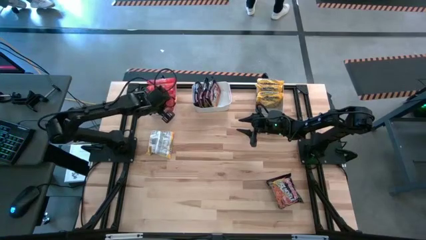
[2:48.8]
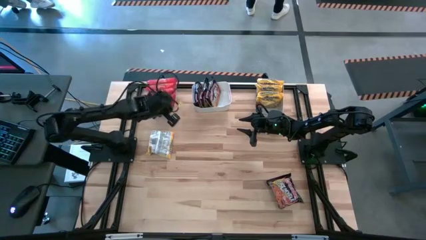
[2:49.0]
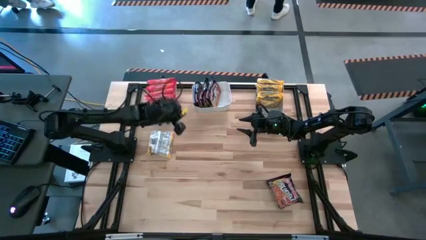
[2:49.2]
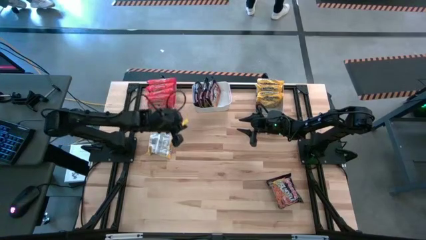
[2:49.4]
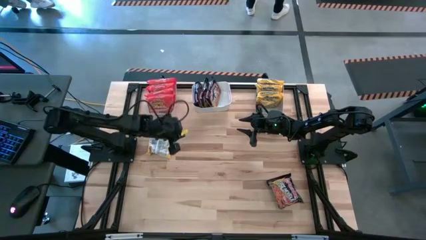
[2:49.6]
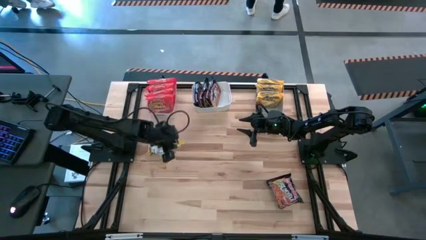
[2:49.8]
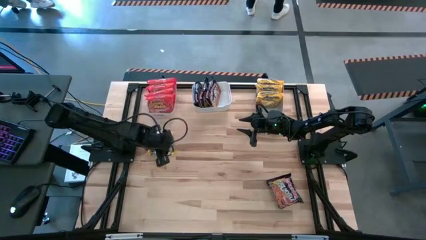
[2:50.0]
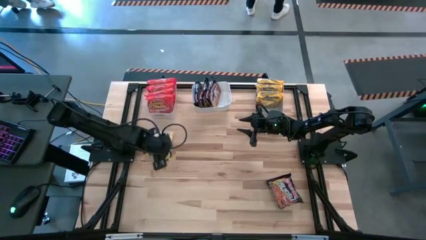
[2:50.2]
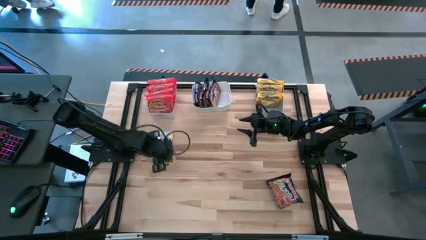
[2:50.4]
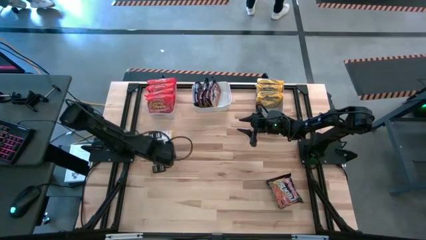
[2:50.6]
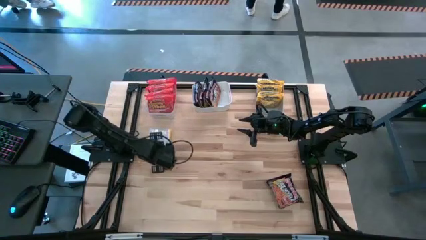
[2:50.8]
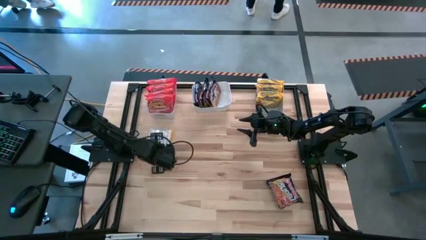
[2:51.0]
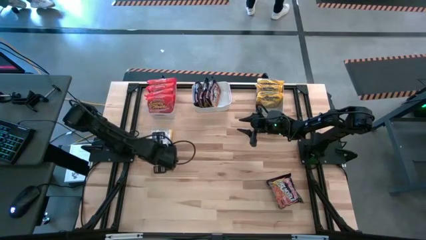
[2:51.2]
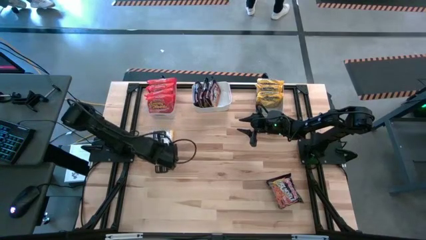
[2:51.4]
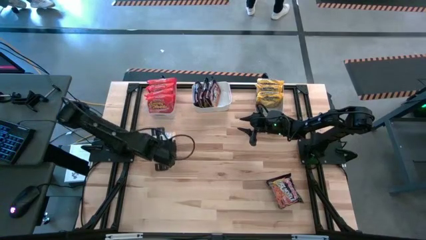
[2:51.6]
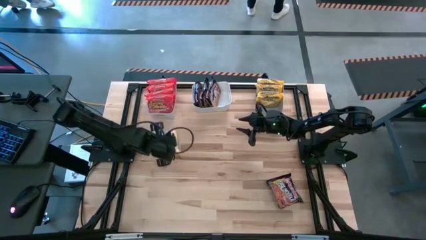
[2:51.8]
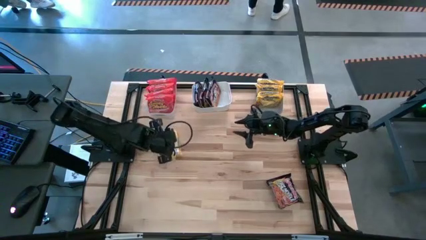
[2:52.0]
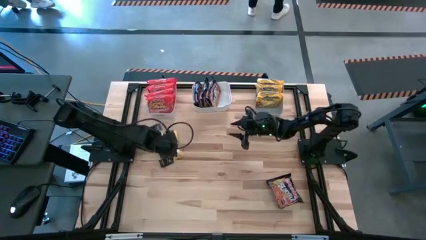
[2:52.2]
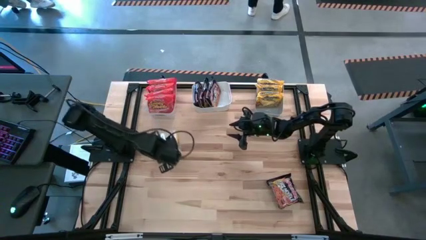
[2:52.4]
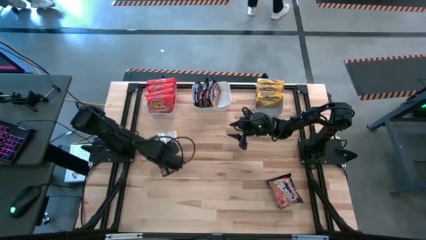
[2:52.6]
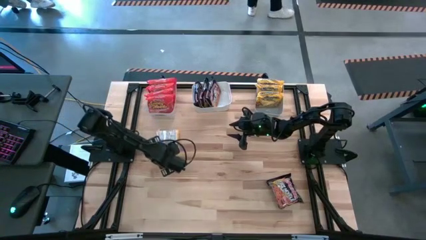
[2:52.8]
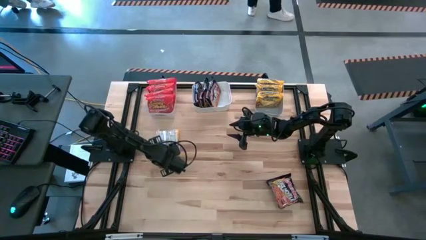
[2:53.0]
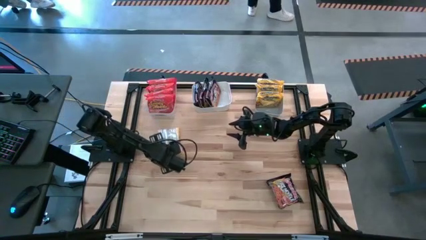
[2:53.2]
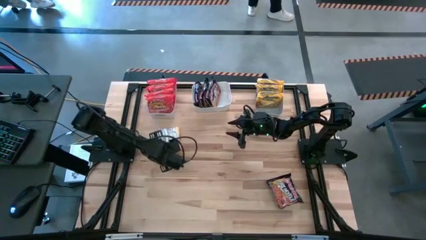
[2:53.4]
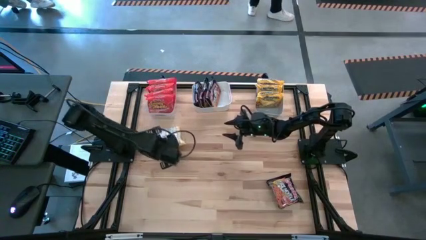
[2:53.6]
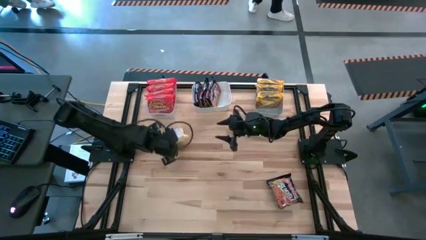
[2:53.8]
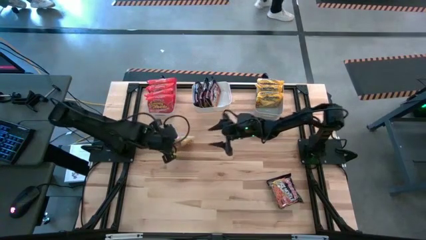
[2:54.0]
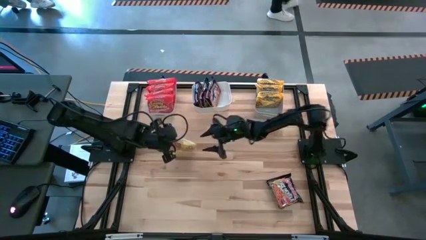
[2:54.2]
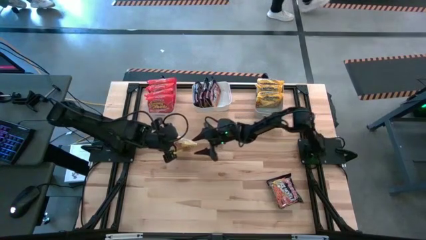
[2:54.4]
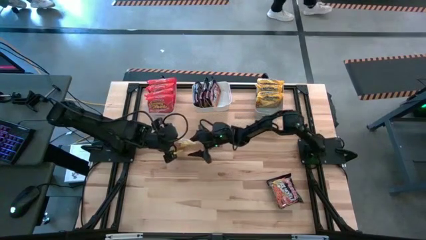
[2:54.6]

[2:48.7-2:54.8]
Task: Sort Maruchan noodles
Put the yellow noodle pack into the gray bin

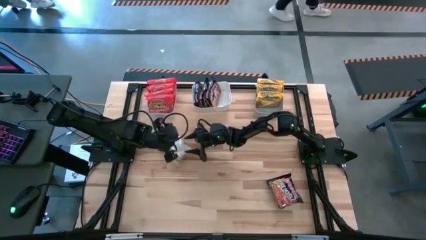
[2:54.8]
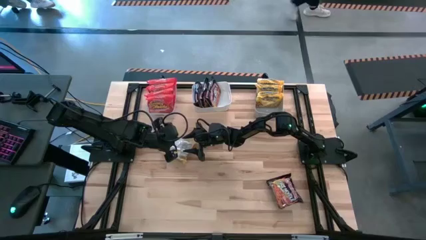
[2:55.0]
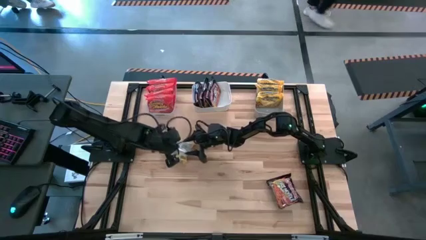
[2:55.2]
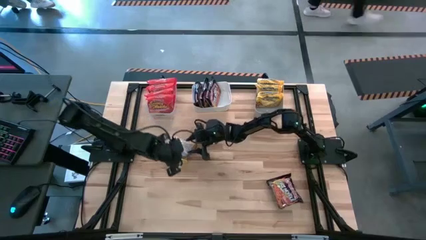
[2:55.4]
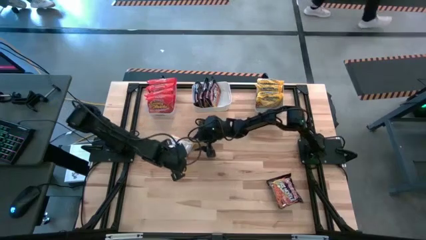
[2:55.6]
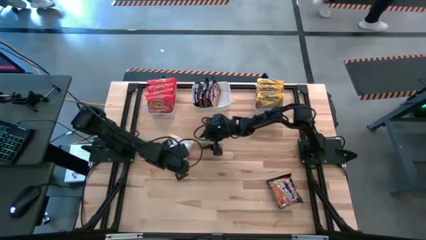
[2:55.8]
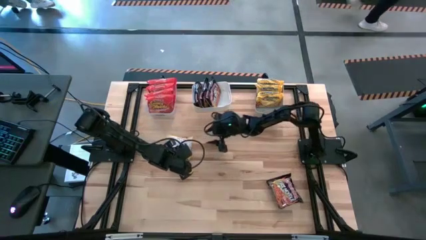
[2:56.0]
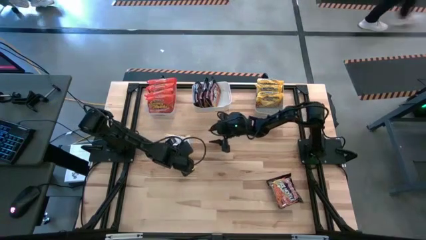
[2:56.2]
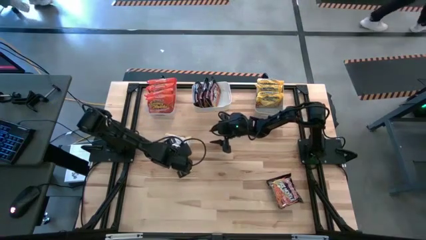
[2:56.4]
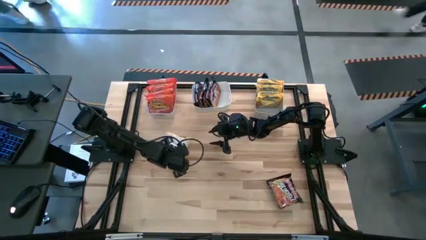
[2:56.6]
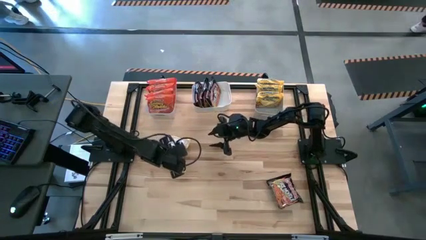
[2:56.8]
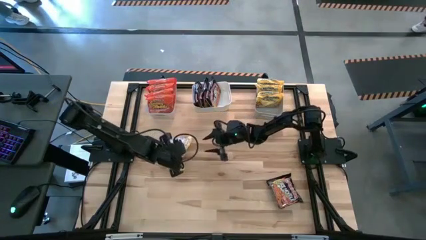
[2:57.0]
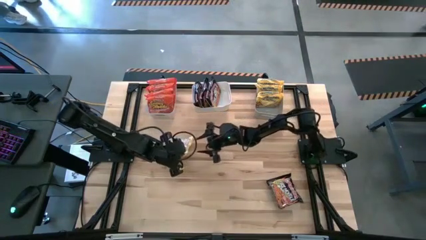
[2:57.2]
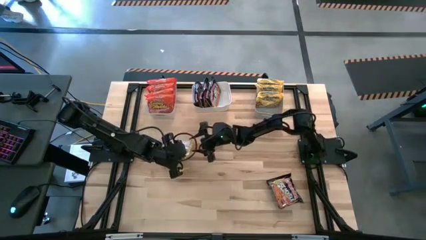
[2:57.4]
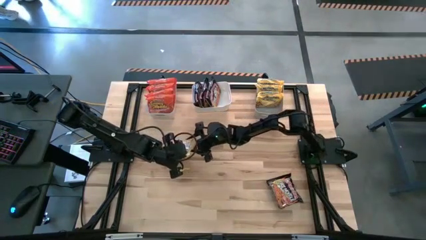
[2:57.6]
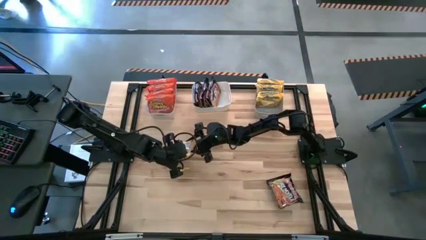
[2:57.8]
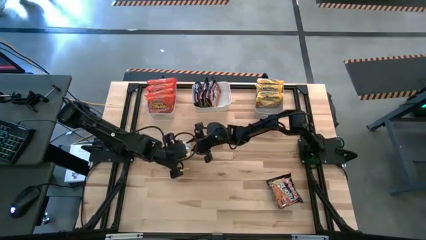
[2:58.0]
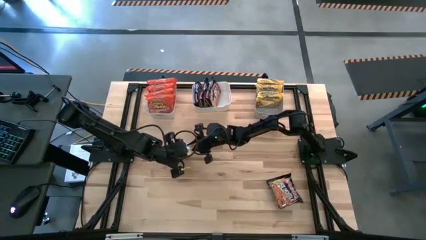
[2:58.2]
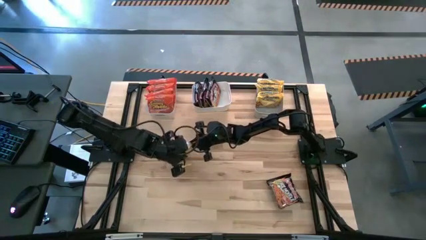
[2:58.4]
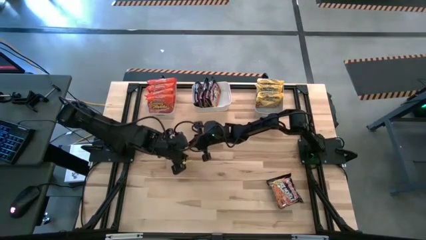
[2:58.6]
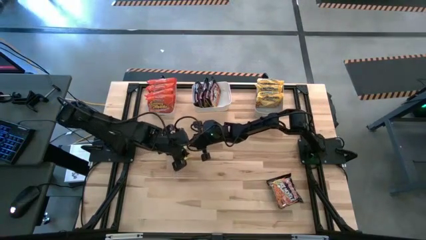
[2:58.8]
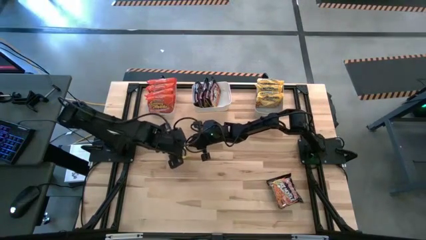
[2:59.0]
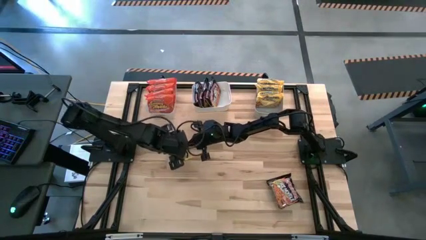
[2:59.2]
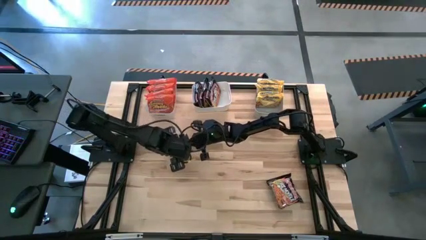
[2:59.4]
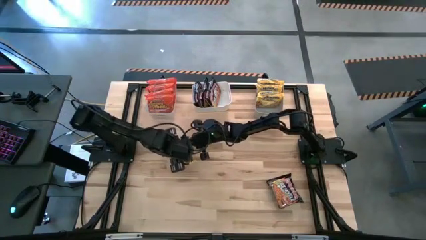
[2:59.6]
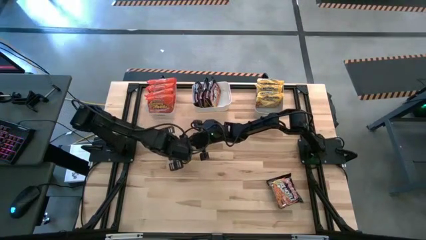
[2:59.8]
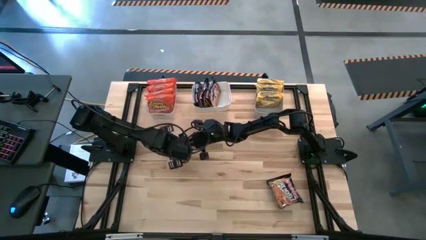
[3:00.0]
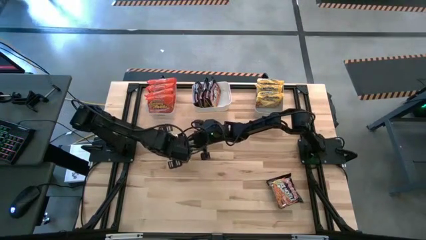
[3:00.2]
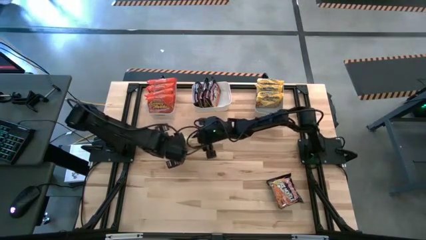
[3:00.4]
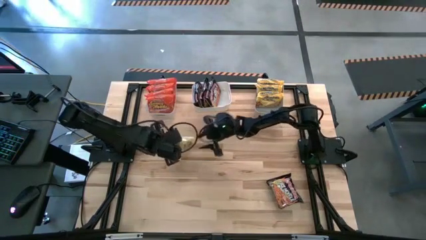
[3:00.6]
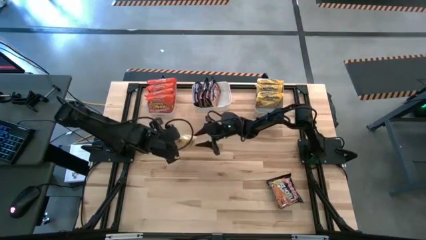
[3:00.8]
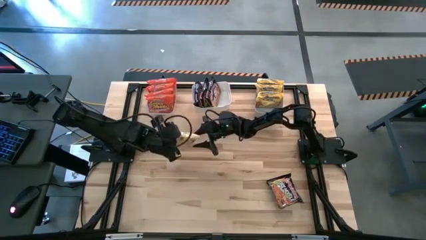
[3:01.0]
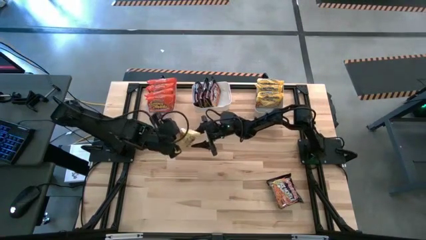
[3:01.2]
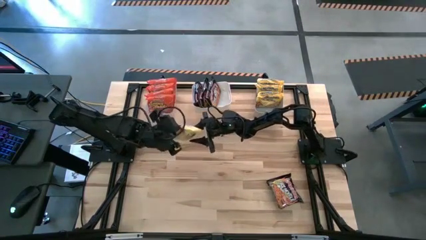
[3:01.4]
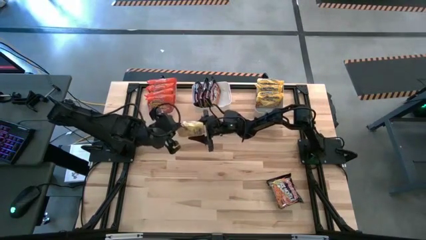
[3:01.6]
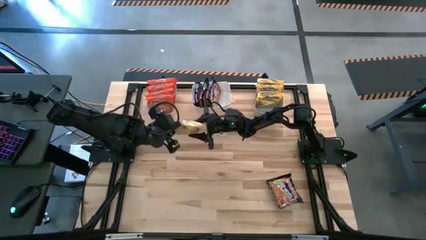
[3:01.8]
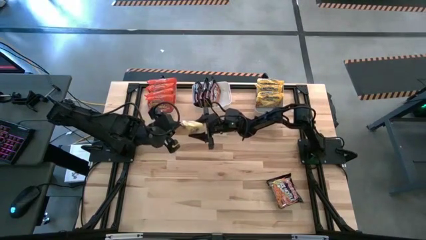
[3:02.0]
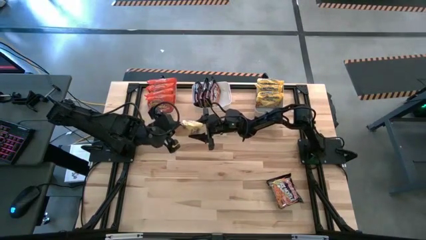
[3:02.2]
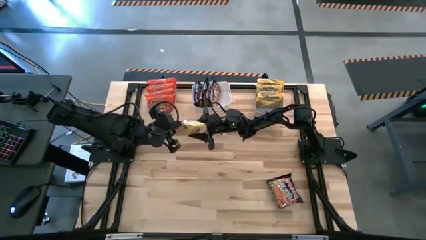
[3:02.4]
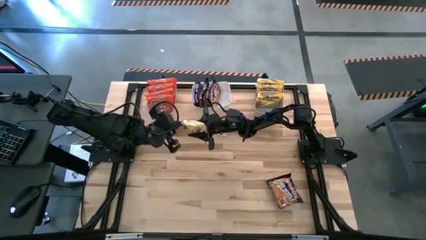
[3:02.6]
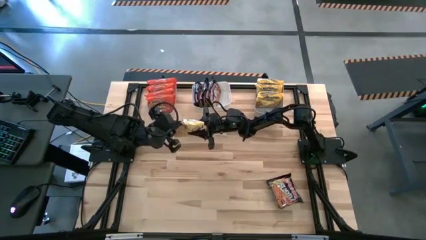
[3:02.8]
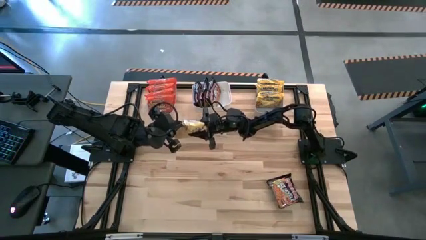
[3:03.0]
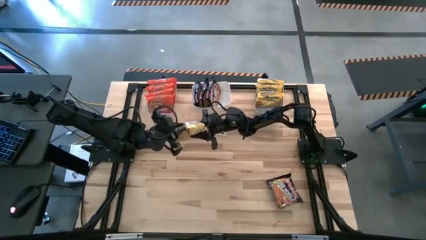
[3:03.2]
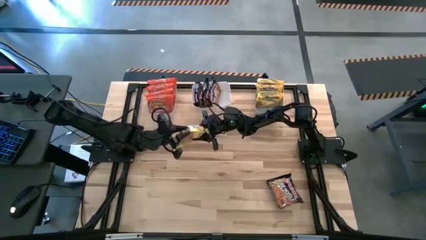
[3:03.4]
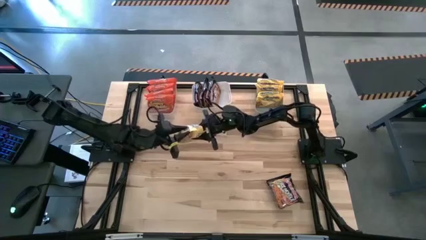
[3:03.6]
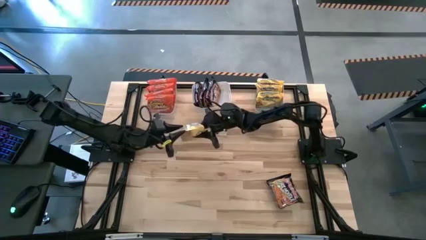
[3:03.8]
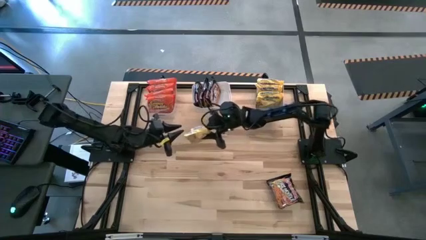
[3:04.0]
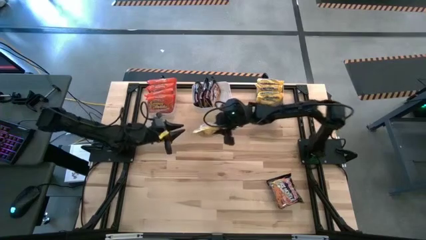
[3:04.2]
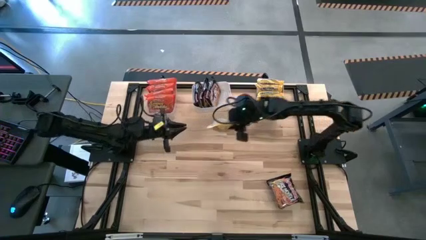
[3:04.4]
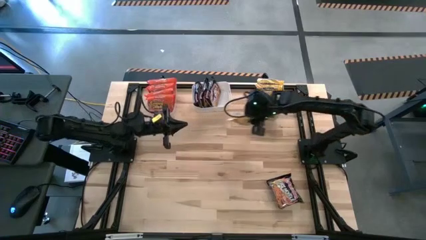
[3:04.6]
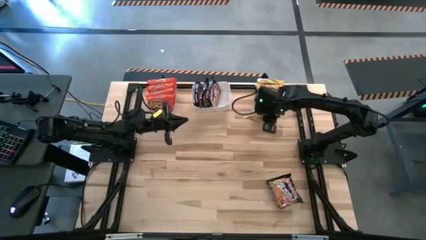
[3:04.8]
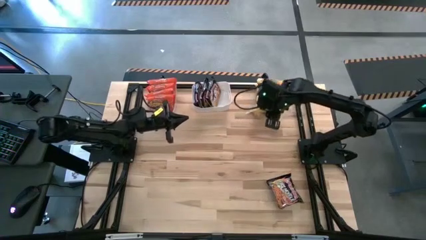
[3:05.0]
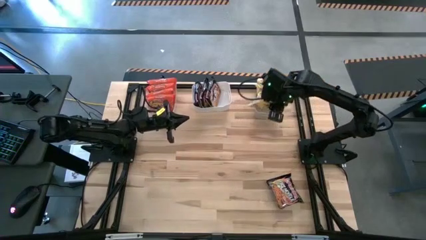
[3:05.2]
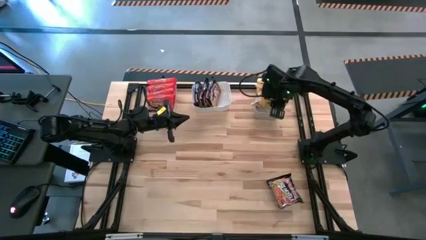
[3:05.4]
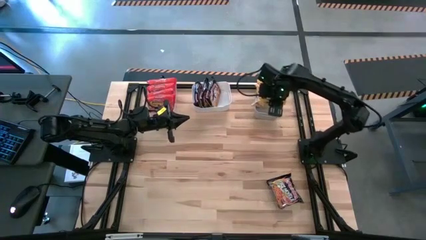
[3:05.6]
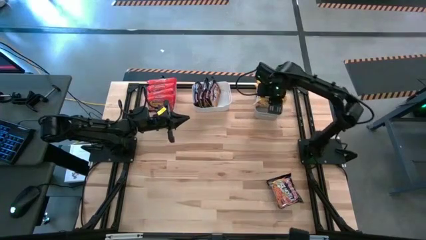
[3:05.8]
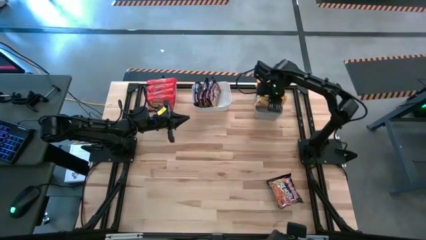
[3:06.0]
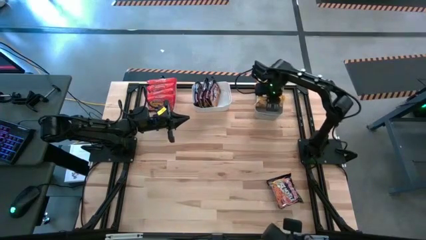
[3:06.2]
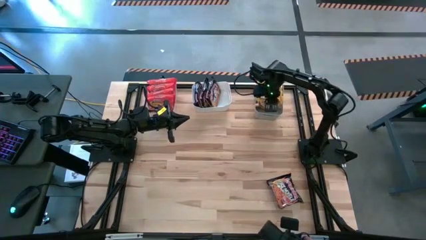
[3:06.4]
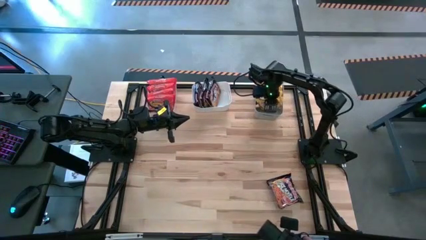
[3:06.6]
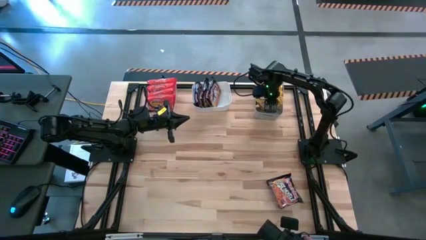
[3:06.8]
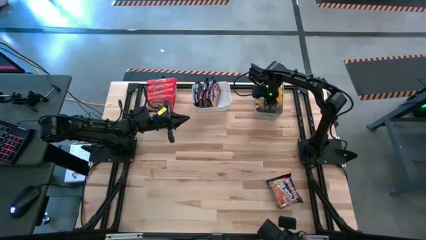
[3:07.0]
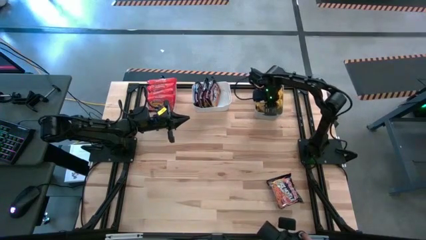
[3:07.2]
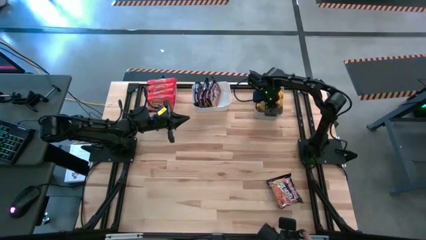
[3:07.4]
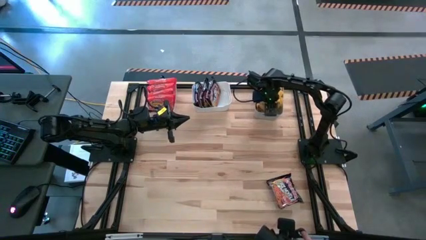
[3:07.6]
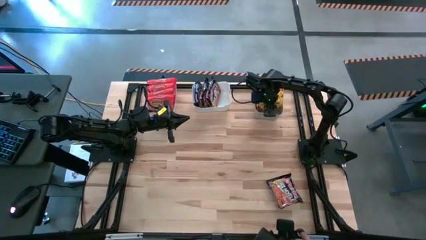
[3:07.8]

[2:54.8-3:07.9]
Put the yellow noodle pack into the gray bin
